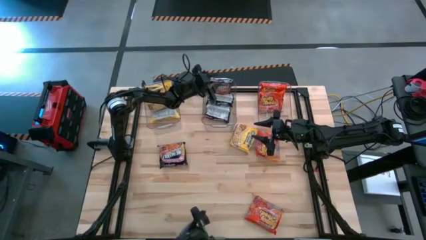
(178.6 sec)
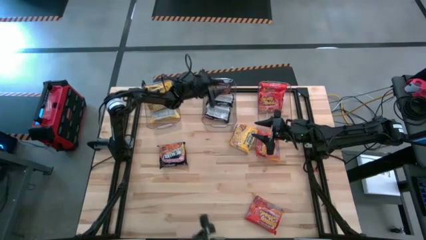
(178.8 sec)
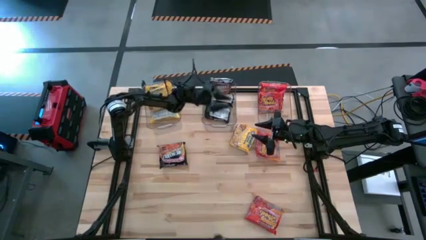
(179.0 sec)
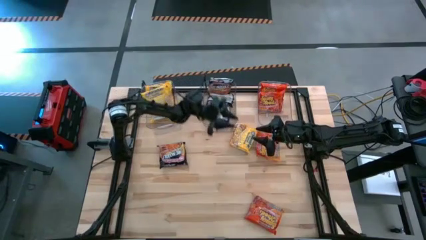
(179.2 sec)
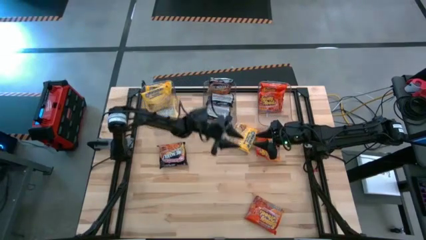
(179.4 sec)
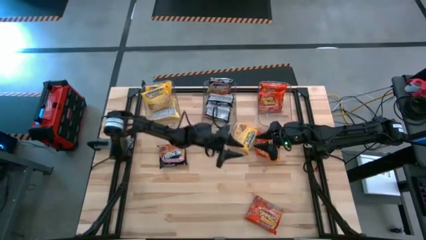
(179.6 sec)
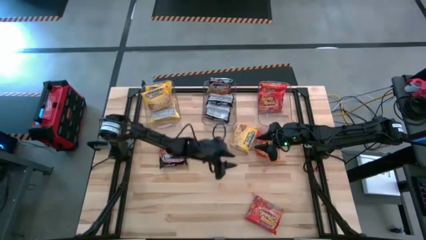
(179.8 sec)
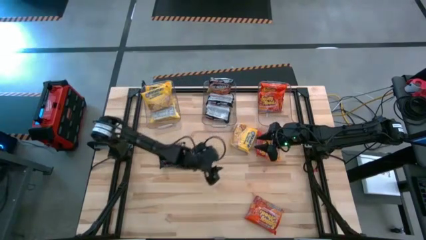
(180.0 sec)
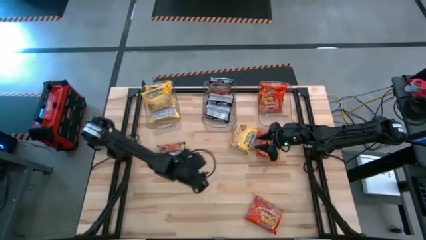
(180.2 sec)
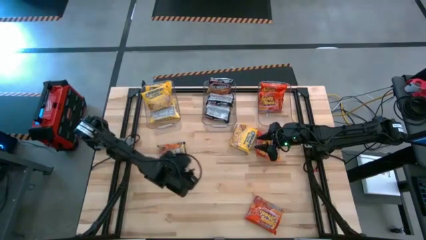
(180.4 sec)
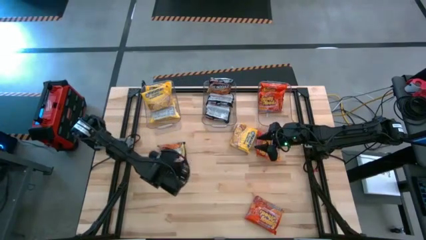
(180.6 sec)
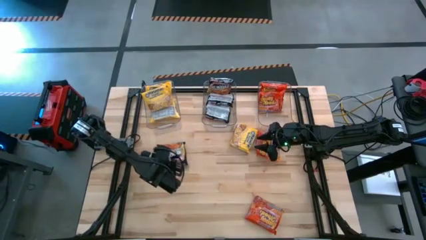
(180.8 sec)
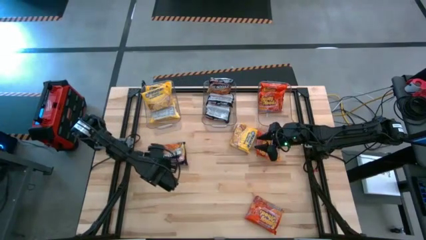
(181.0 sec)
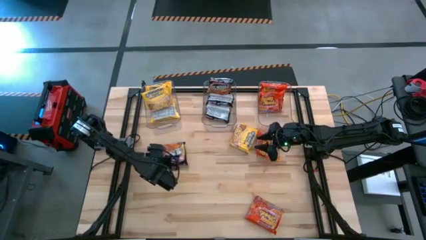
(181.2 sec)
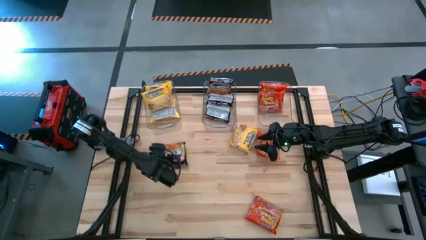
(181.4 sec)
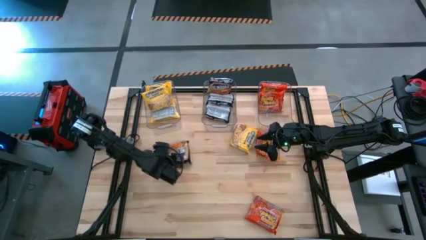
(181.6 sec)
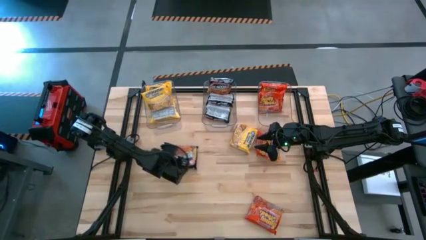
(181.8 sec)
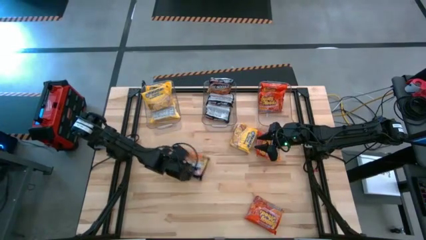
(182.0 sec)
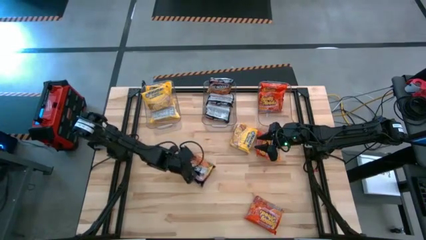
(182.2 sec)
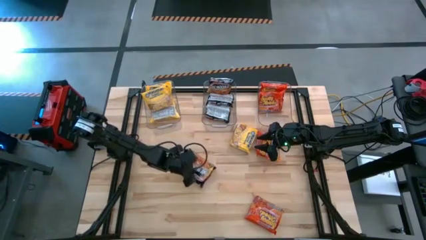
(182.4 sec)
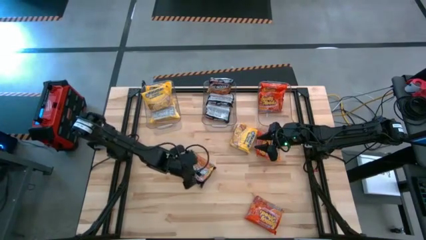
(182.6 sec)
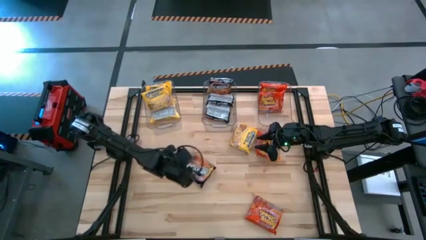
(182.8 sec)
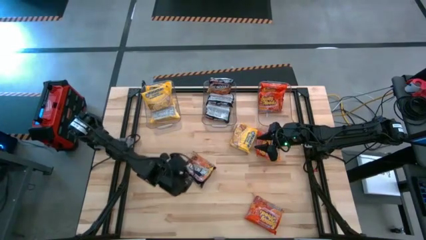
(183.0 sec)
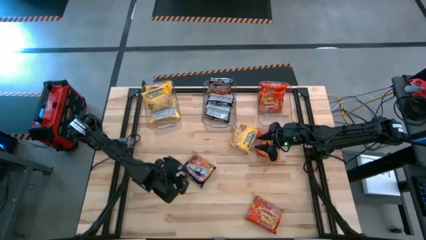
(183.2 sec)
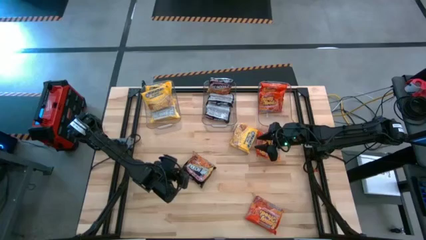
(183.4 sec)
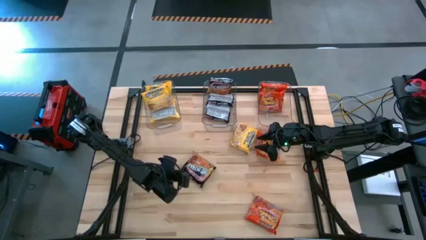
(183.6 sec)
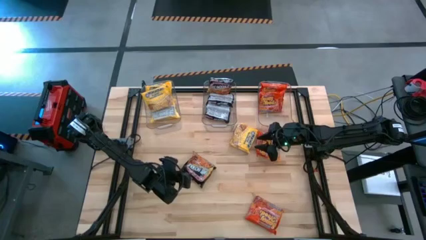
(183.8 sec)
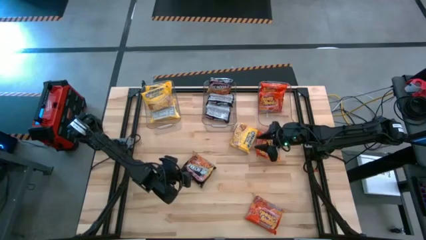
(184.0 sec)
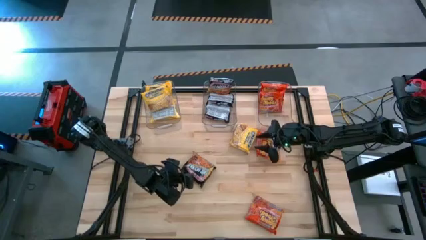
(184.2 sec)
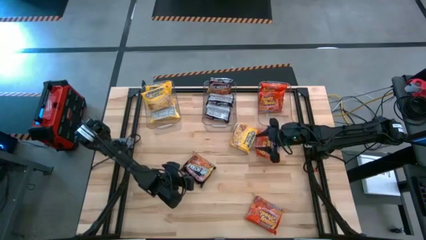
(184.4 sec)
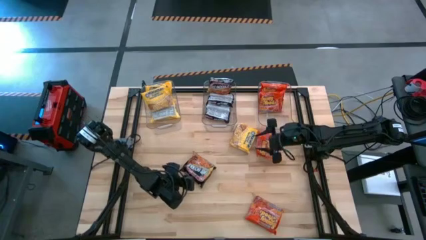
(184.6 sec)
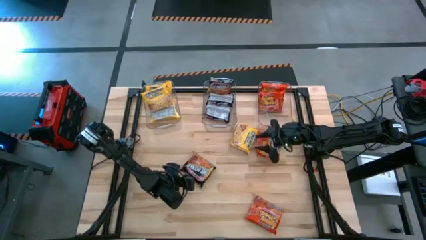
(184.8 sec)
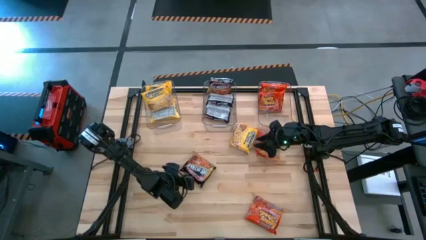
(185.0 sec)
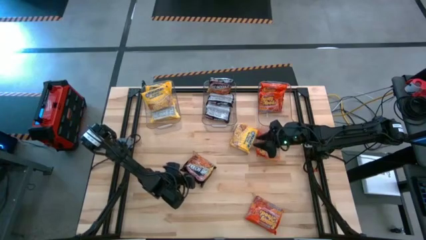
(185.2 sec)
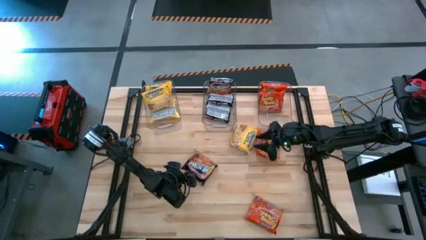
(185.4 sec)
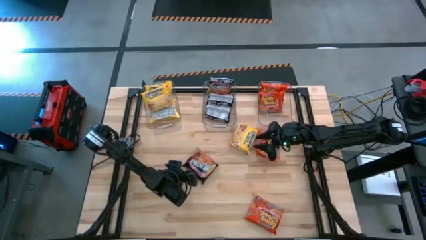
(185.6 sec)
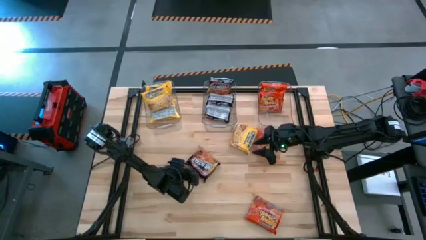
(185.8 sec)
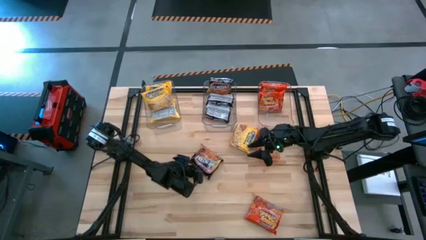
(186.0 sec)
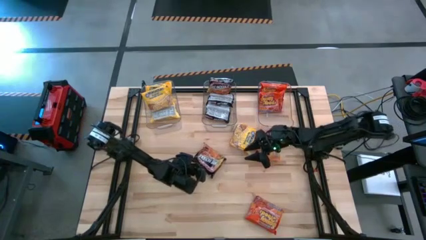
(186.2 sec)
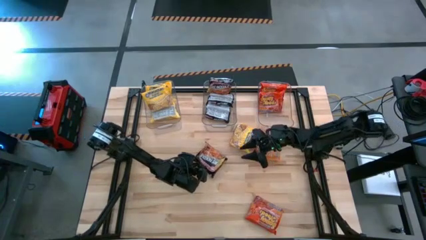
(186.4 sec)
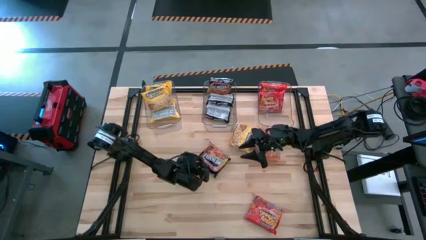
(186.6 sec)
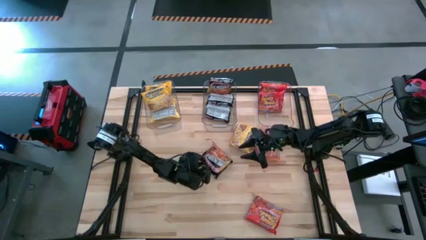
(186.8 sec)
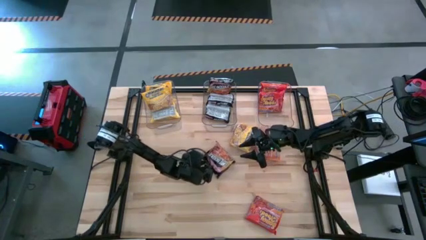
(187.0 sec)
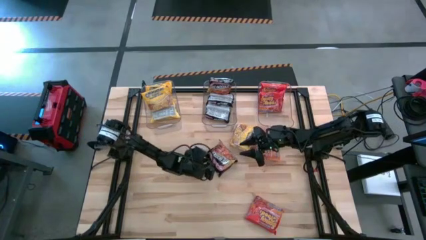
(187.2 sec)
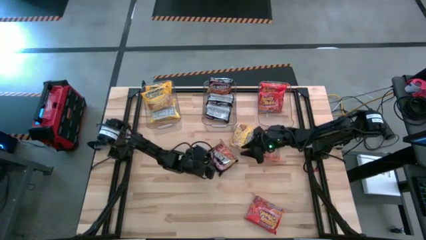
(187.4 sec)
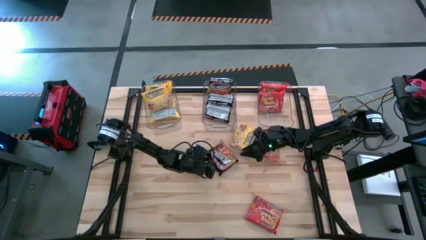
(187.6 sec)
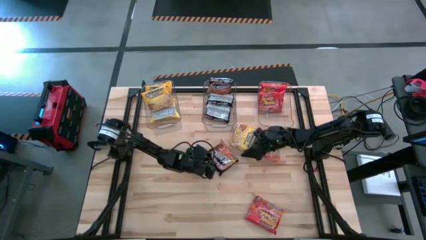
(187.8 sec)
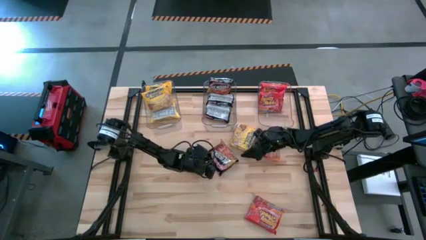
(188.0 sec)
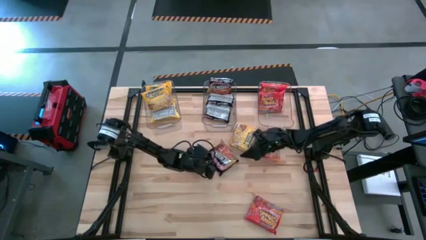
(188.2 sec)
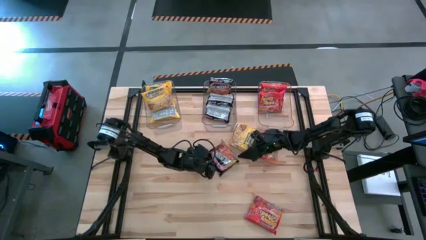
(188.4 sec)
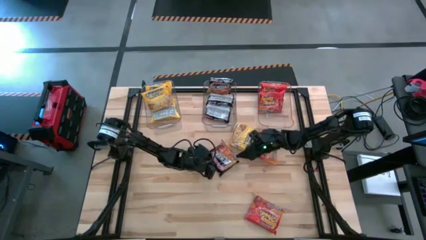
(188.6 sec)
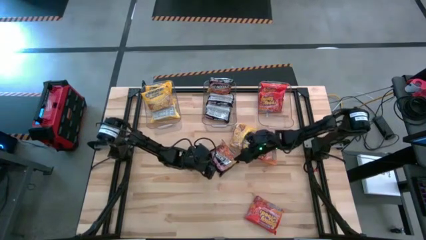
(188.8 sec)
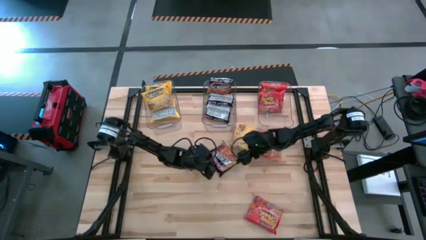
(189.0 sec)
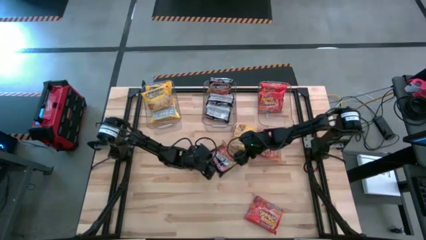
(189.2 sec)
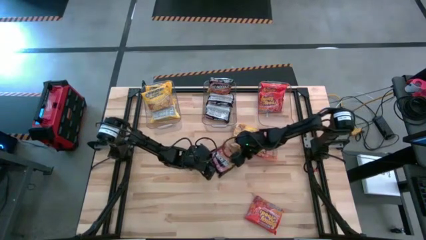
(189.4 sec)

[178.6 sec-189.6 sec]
Task: Sort Maruchan noodles
Put the black noodle pack into the middle transparent bin
